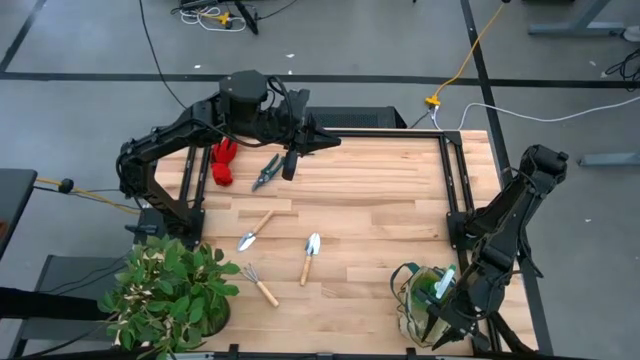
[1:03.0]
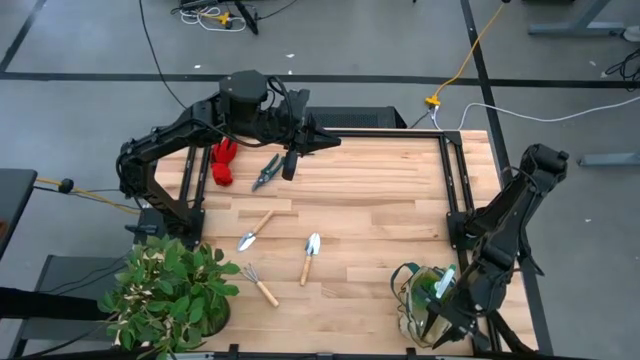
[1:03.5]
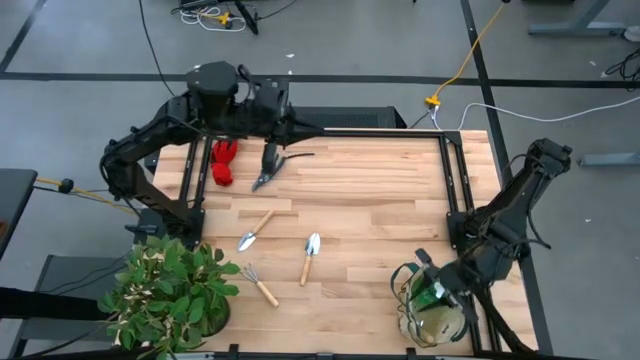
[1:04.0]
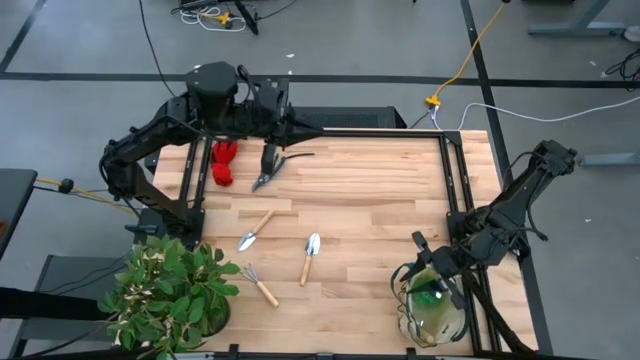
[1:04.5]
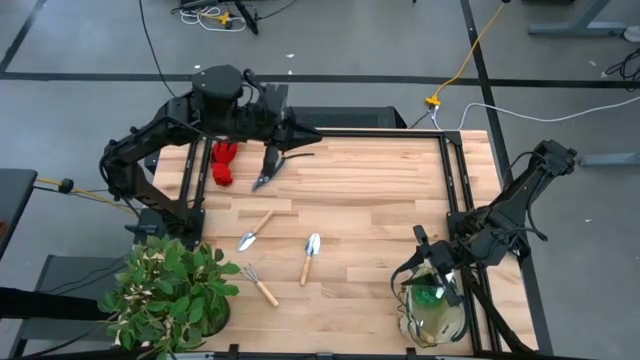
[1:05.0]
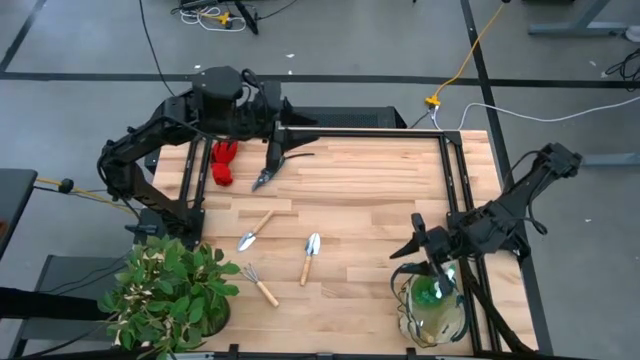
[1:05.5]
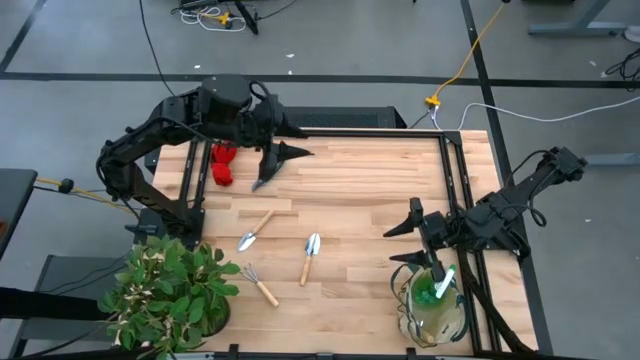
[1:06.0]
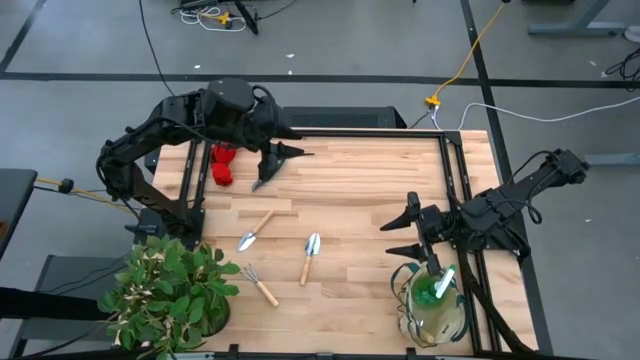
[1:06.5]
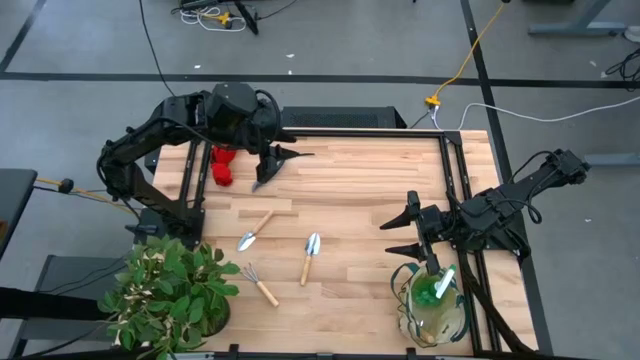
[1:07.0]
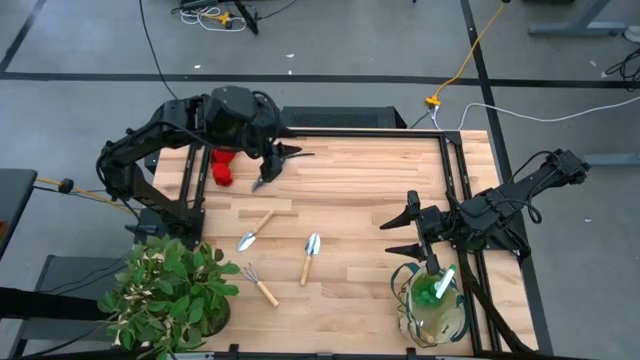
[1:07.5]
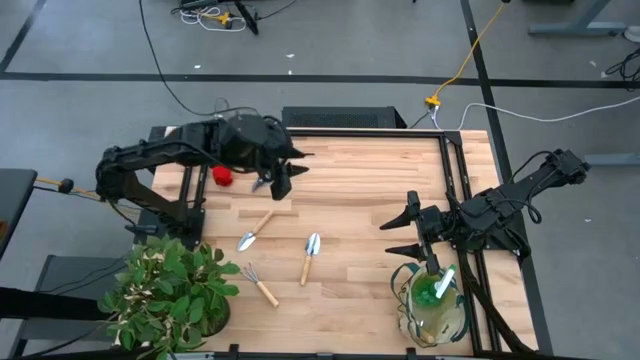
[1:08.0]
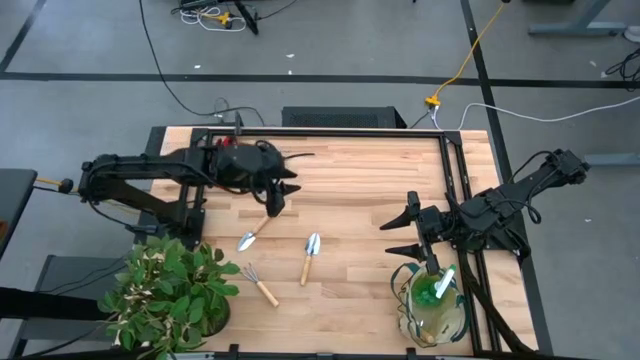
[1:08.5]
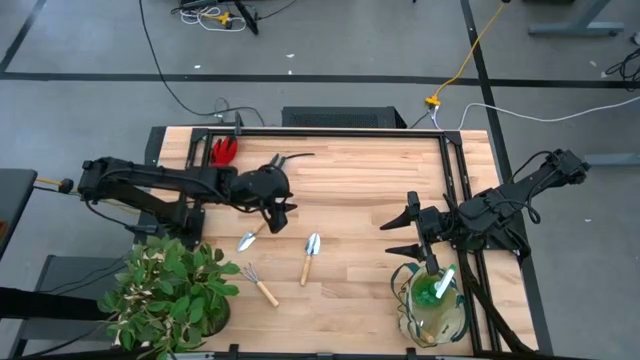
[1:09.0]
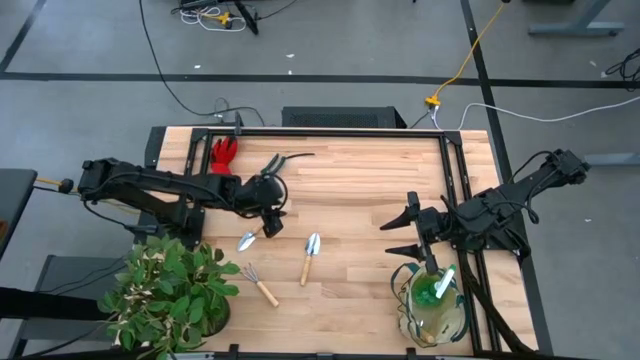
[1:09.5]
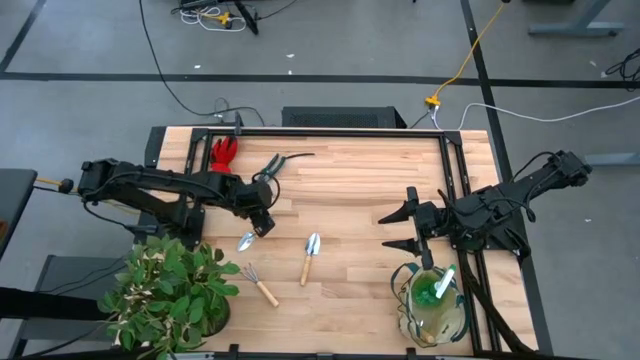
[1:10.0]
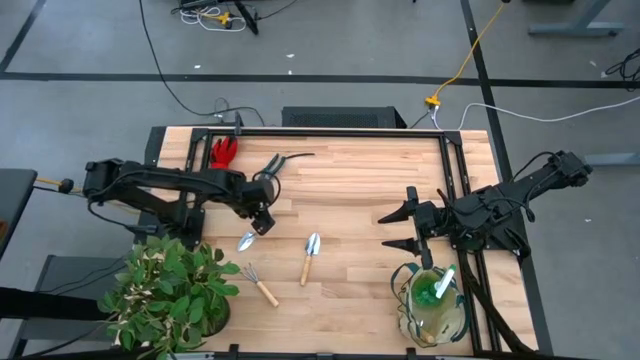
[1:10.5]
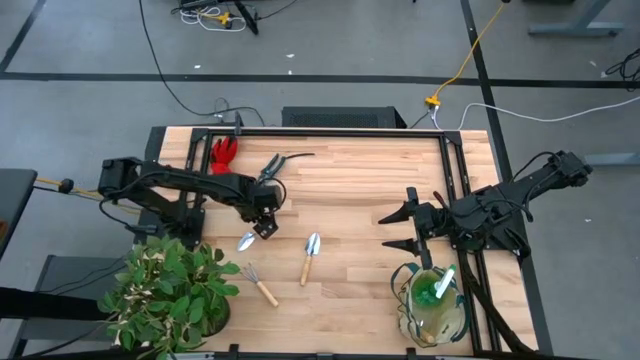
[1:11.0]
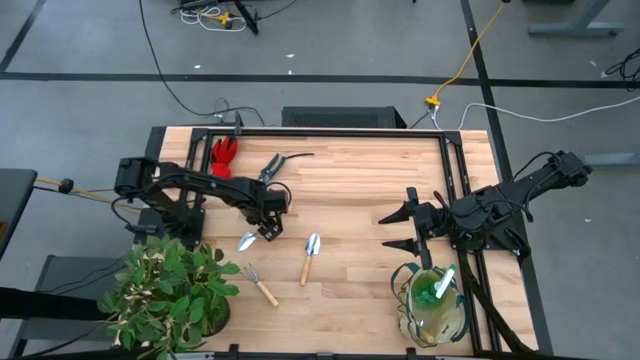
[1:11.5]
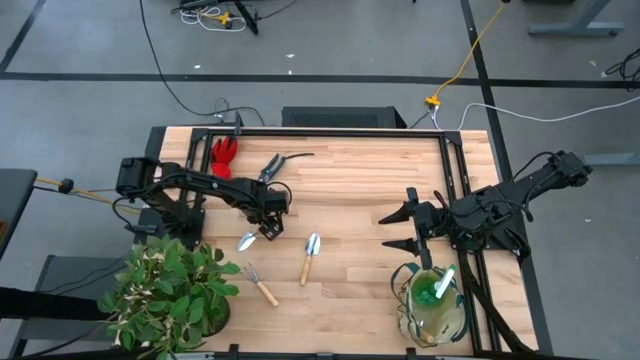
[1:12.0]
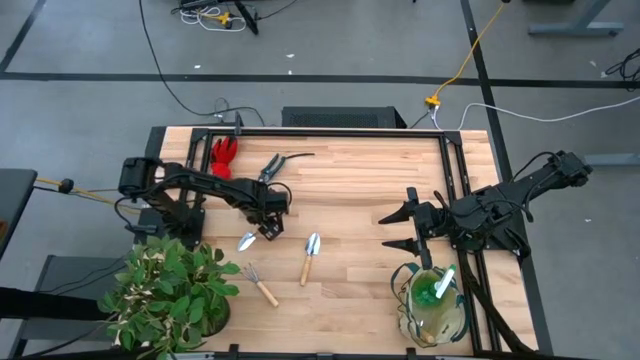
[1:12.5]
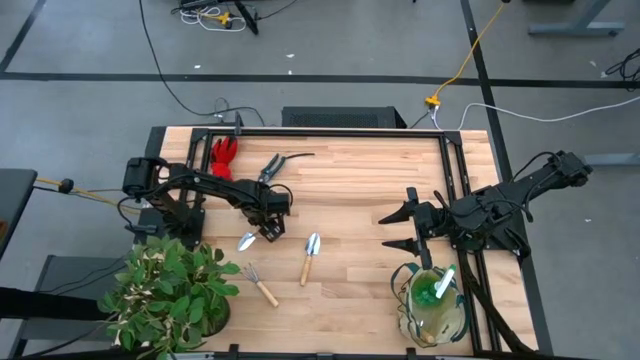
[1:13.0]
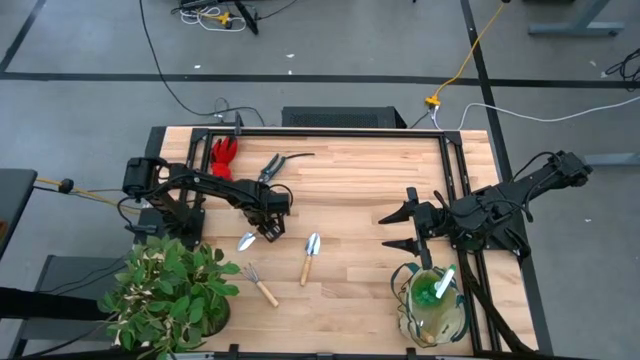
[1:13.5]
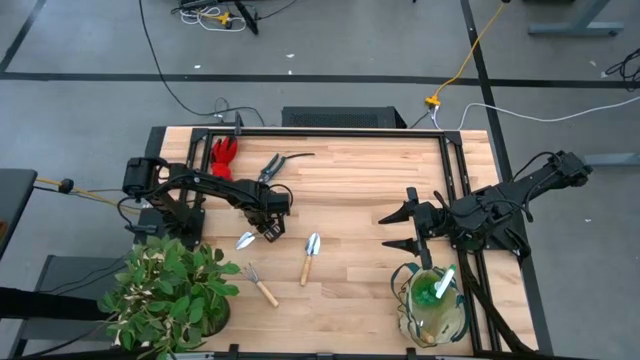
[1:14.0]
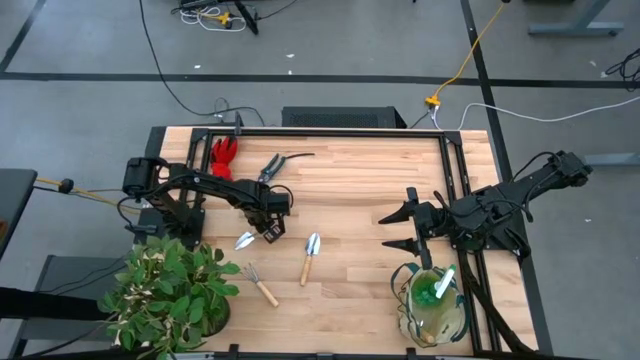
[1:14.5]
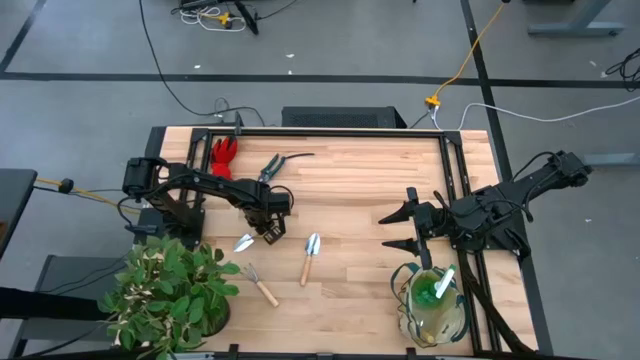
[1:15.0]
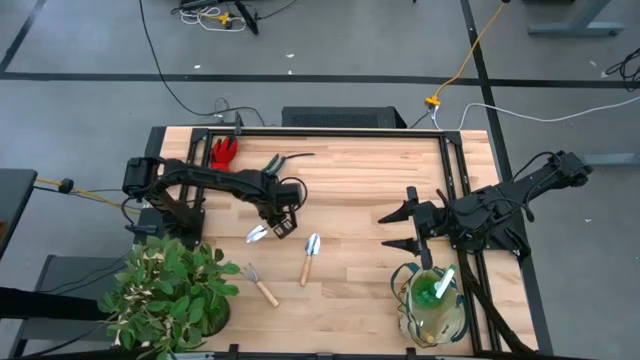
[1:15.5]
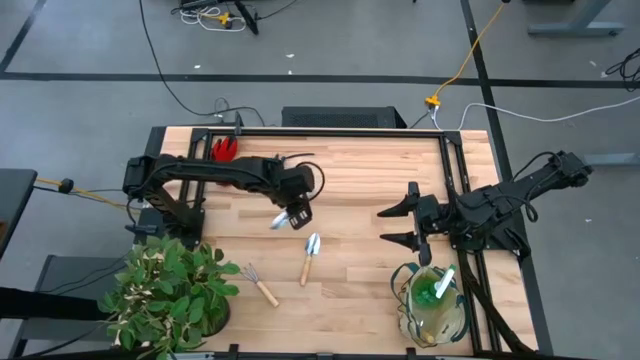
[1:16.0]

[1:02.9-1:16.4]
Task: Pick & Place Garden tools in Gardening bag
Put the left brown trowel into the white gardening bag

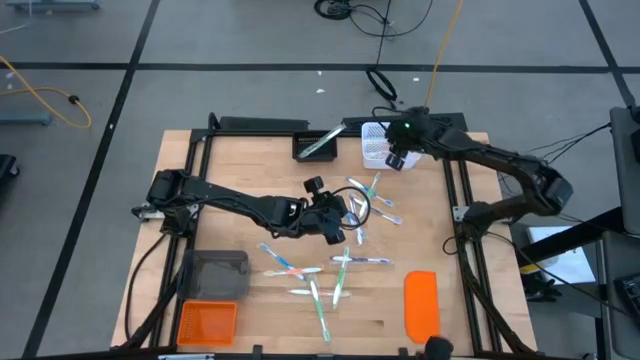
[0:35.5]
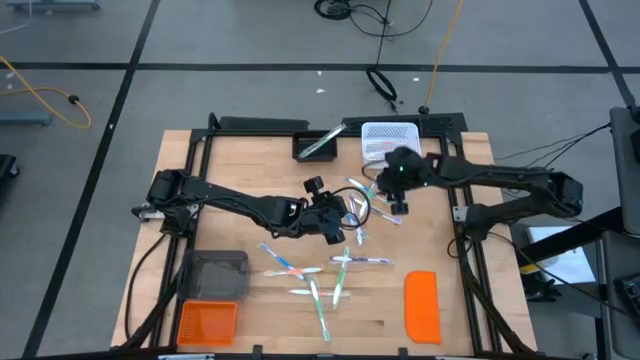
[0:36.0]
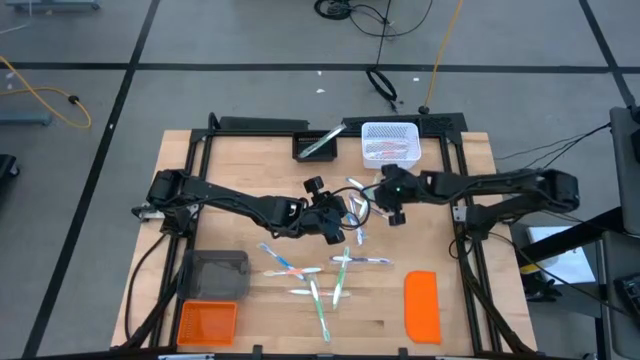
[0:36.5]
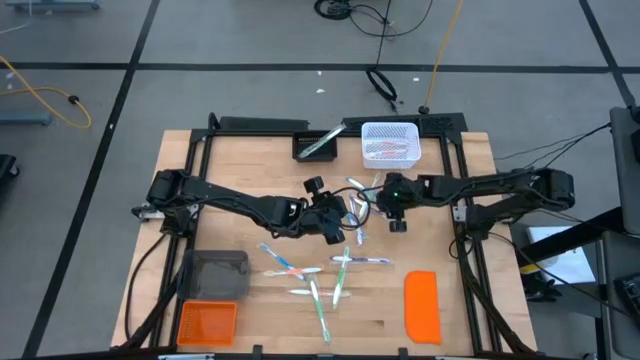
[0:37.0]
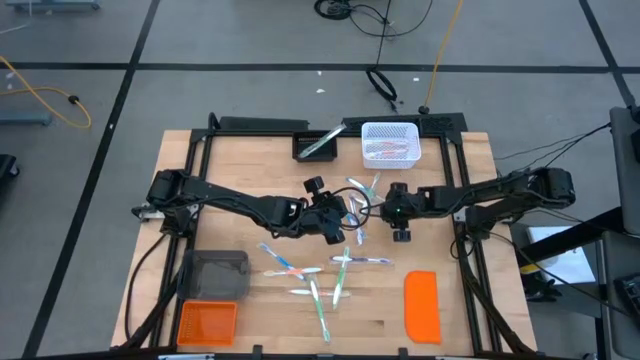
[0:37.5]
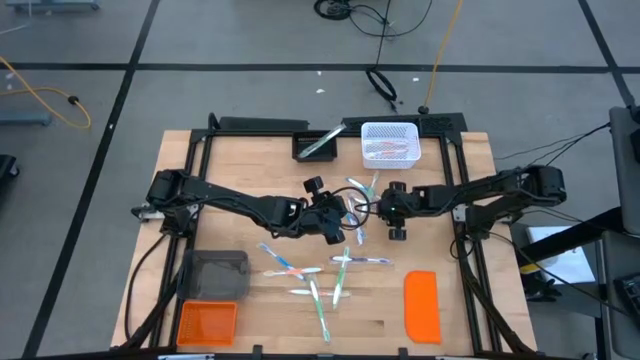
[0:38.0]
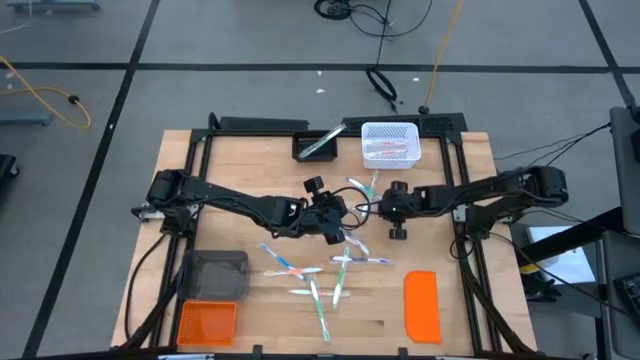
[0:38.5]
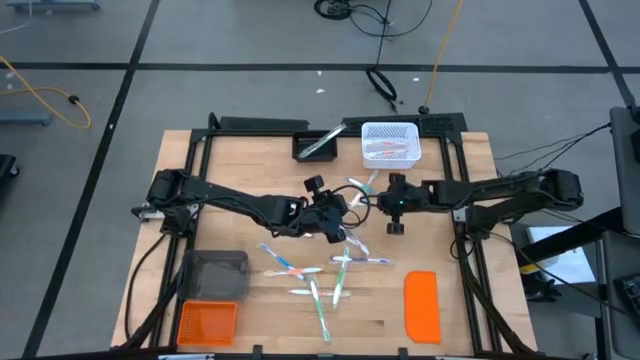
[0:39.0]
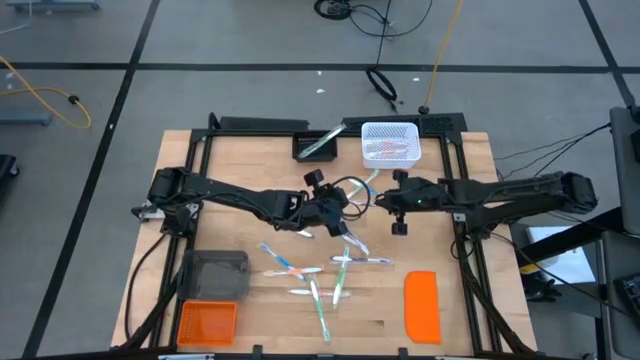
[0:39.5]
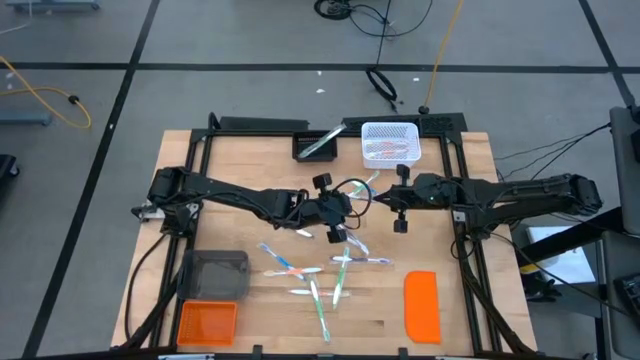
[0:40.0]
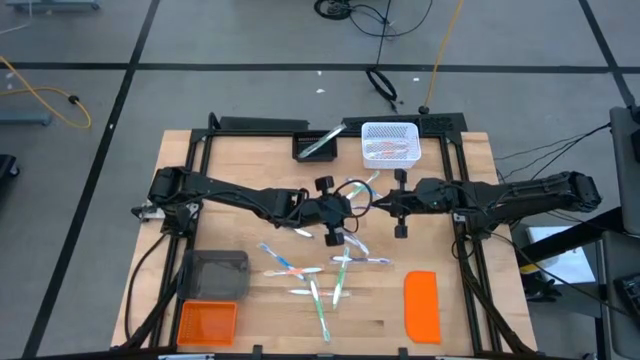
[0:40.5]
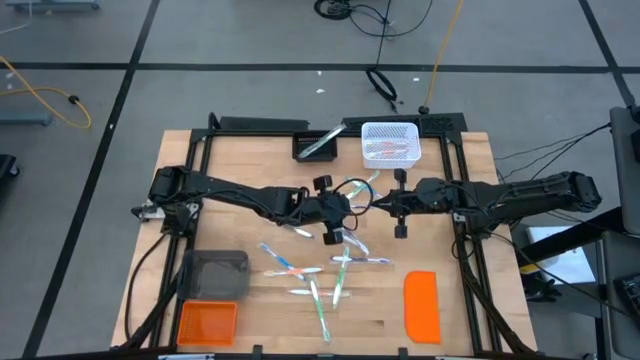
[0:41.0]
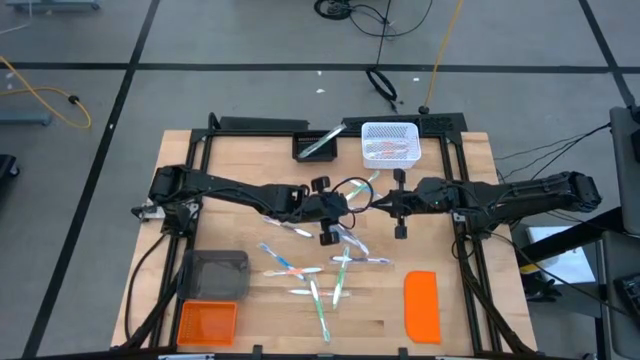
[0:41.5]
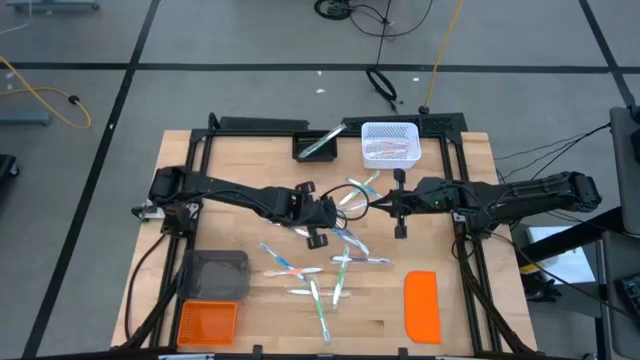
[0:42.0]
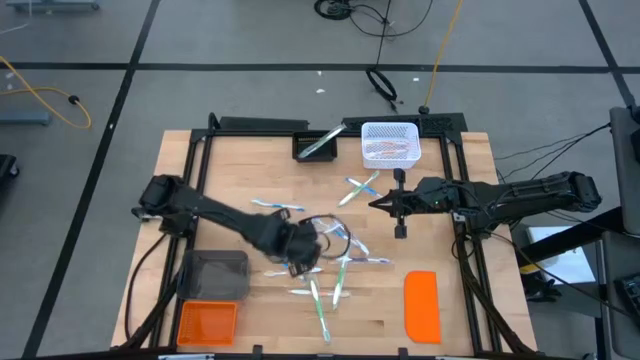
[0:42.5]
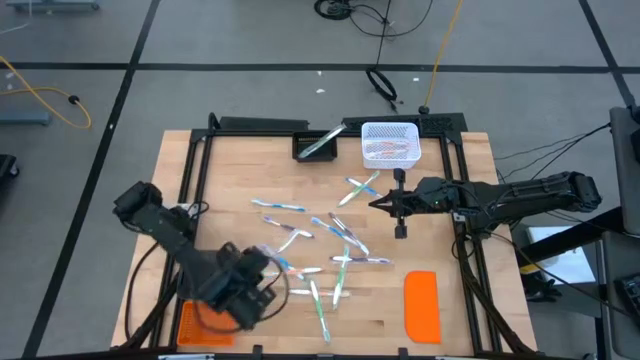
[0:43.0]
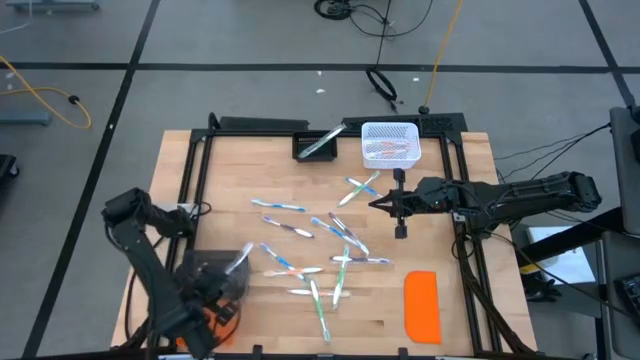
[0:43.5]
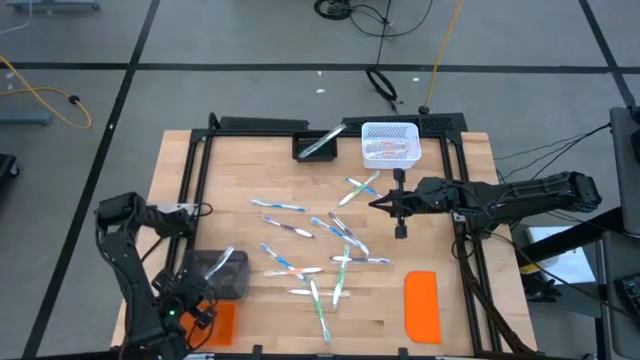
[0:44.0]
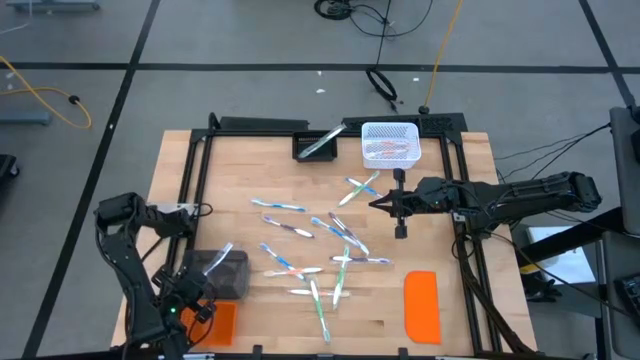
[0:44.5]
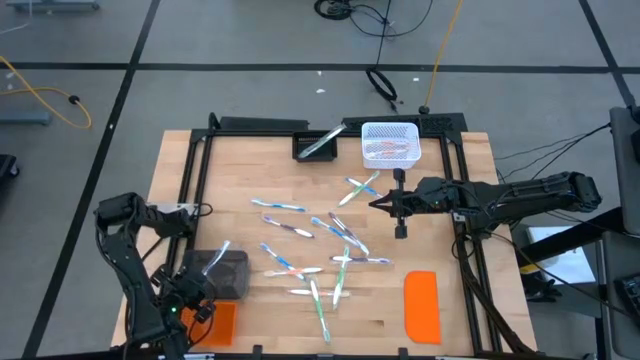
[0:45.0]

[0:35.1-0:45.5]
Task: Pick & Place Toothbrushes
Put the violet toothbrush into the transparent bin
